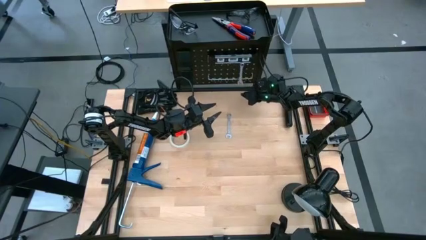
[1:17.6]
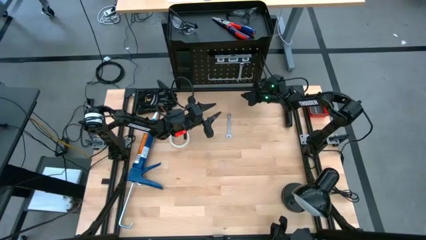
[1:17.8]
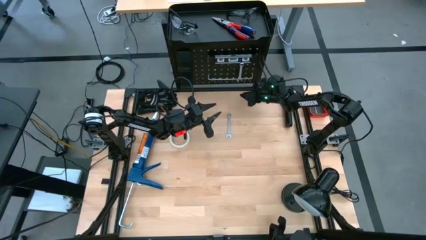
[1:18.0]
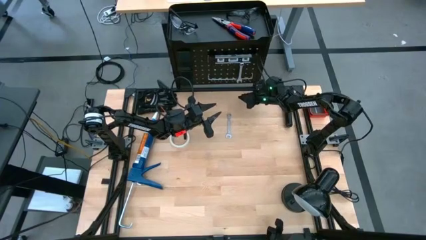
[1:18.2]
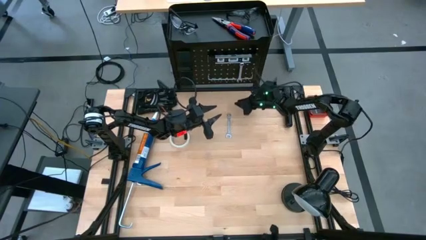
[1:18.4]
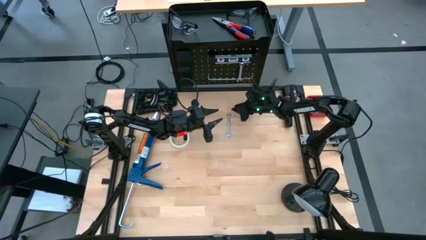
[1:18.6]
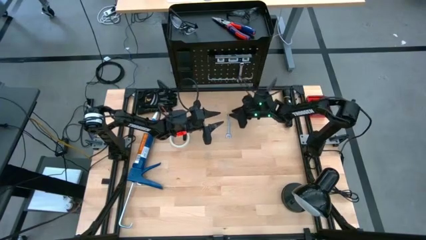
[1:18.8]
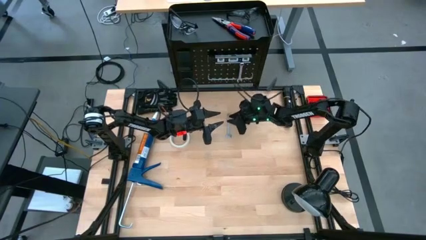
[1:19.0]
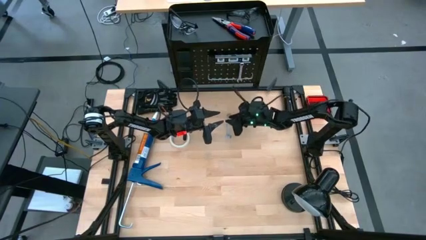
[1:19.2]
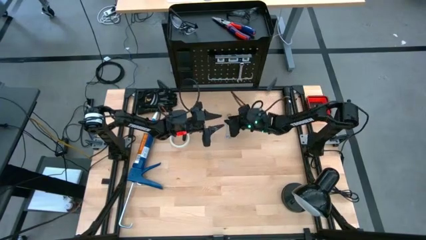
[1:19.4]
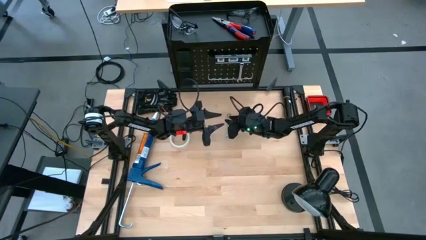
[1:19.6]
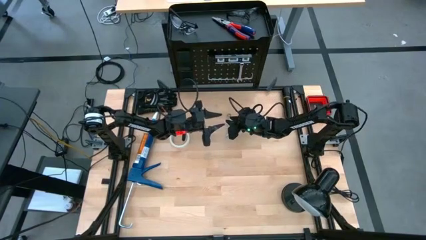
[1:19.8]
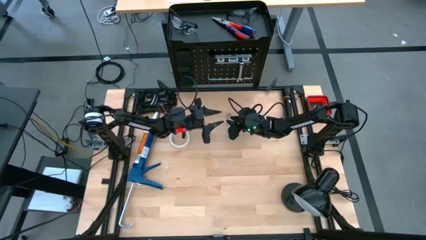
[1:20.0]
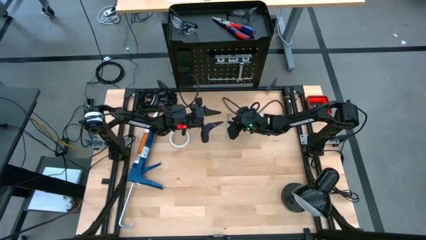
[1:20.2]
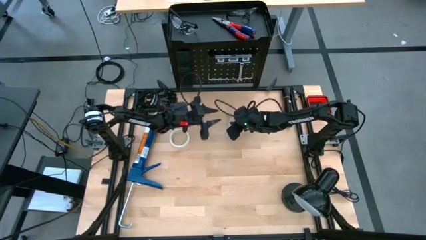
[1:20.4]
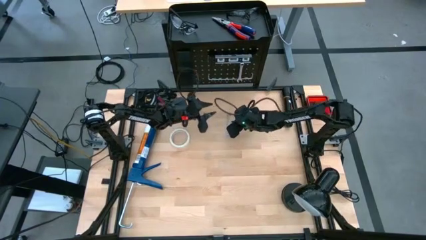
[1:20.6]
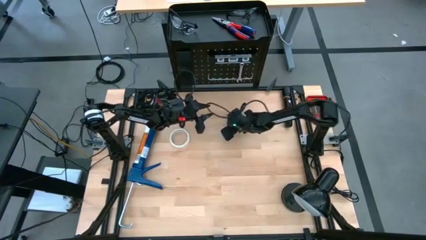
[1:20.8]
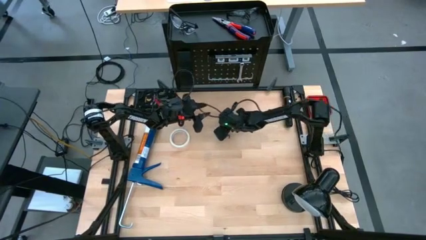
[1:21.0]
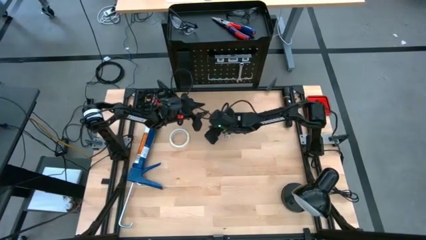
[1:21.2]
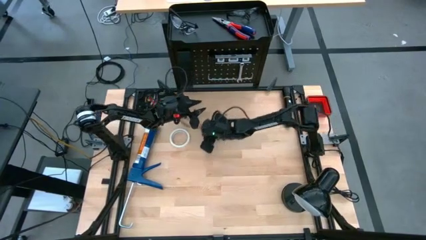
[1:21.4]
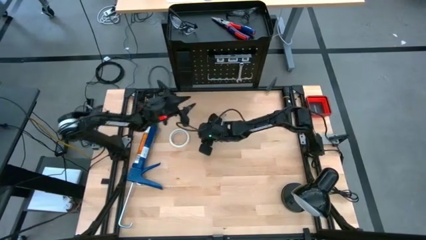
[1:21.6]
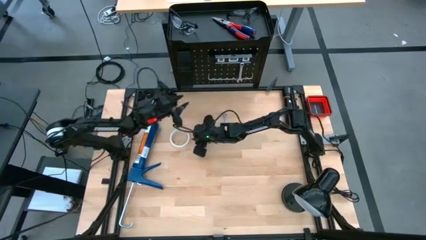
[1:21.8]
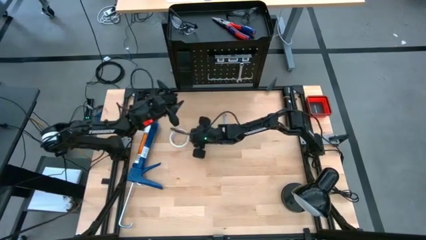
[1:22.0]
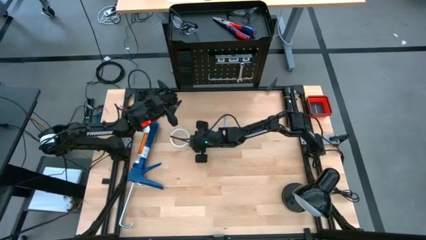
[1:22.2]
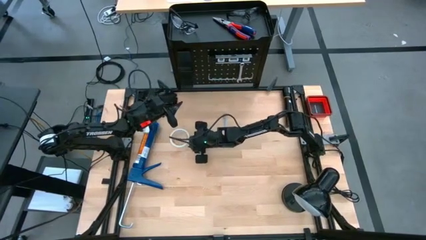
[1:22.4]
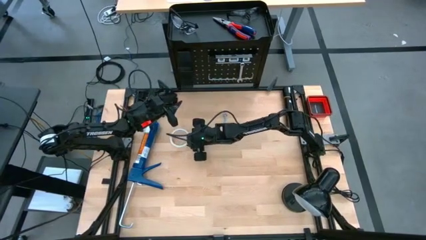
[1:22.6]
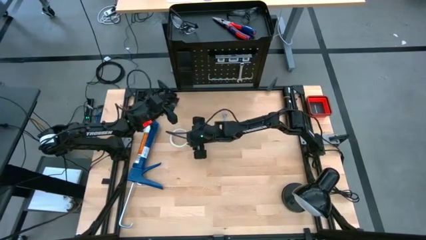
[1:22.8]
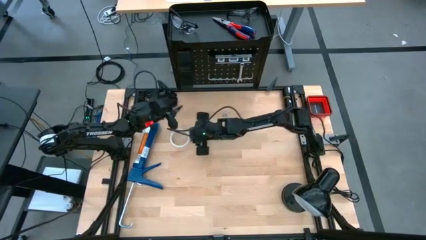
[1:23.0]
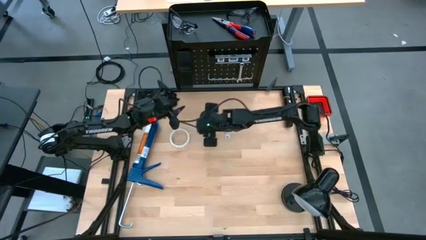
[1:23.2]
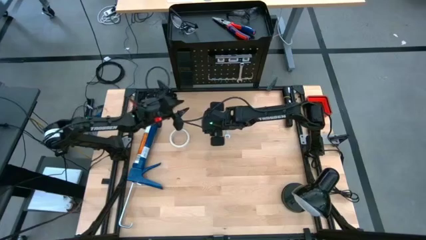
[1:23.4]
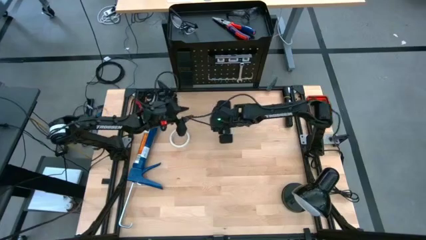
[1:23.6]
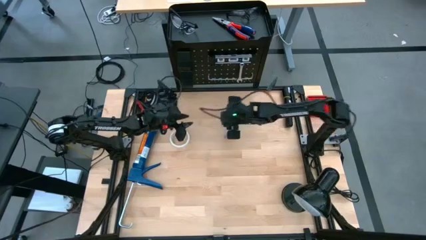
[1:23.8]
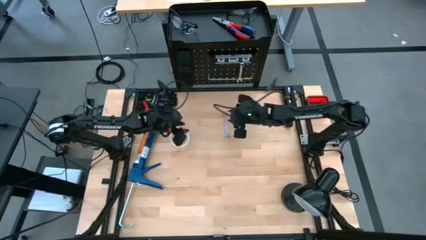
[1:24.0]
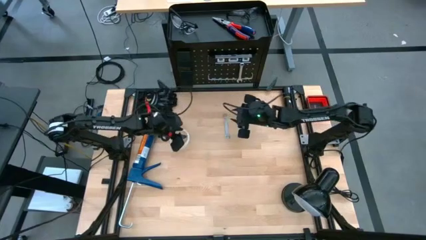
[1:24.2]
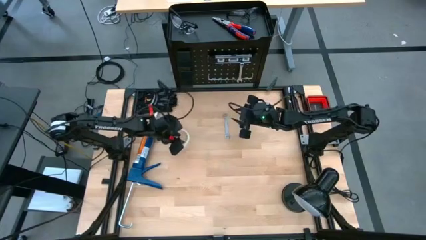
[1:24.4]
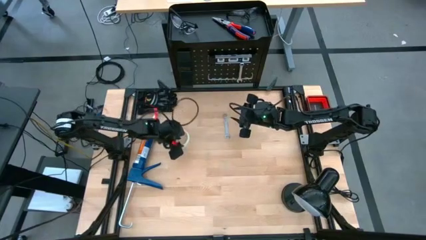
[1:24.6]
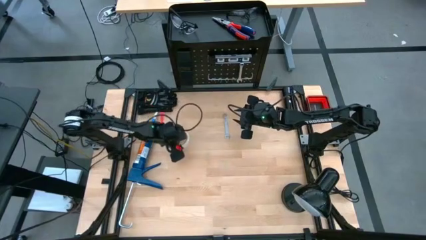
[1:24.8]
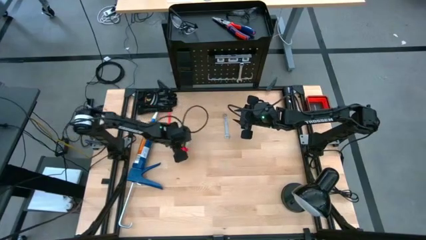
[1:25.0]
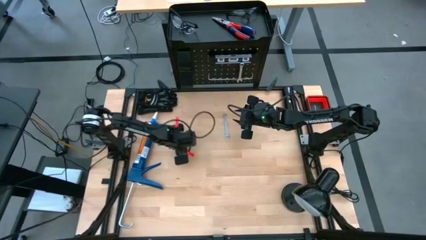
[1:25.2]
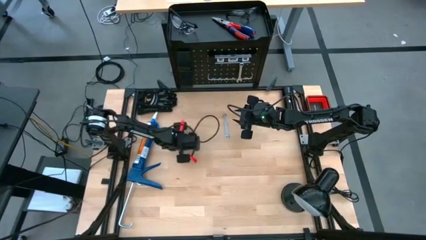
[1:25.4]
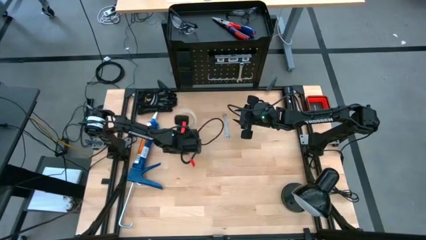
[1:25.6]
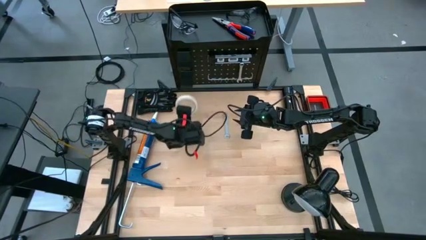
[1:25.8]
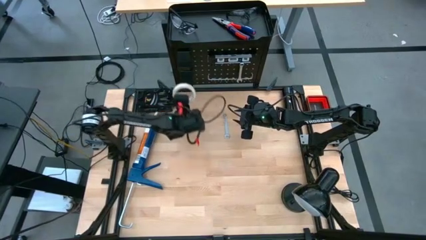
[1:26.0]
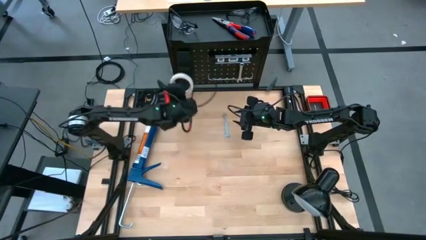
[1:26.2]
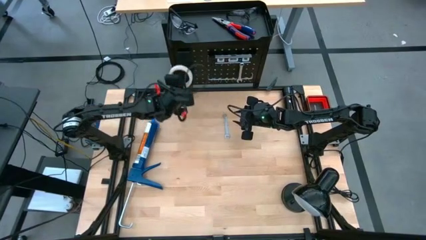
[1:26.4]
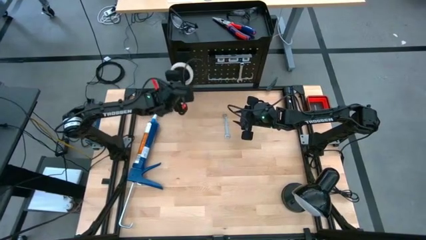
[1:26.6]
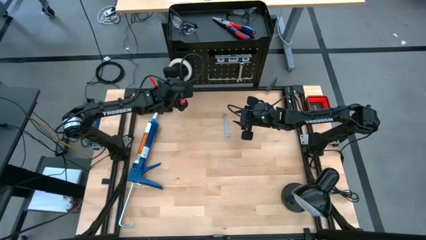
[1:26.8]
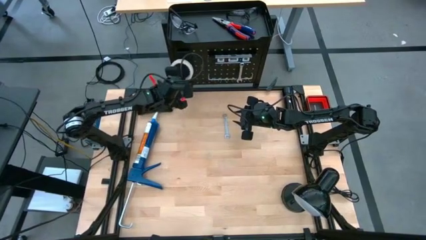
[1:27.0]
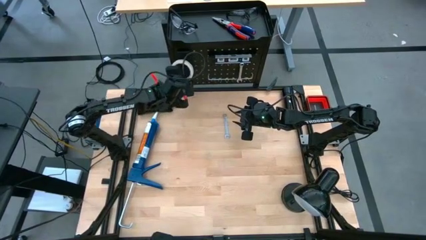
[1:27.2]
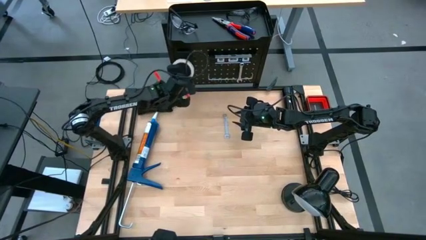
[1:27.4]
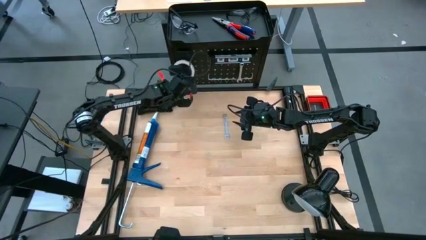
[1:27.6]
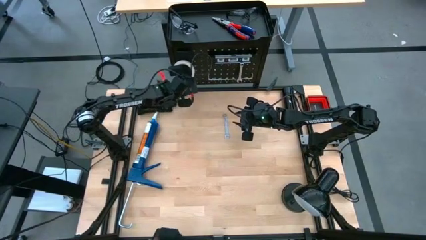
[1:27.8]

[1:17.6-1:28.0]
Task: Hang tools onto peg board
Hang the tape on the peg board

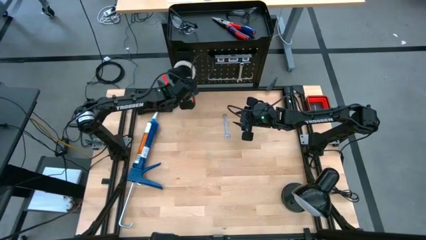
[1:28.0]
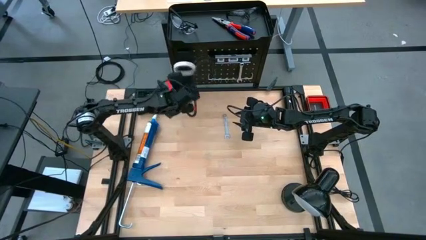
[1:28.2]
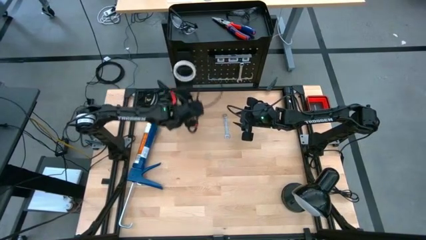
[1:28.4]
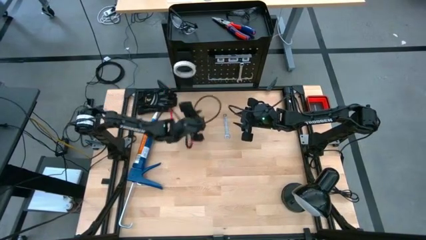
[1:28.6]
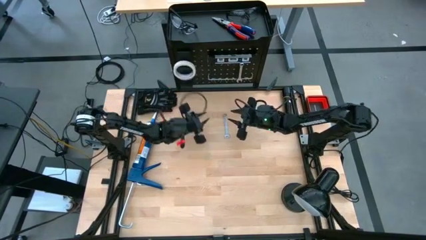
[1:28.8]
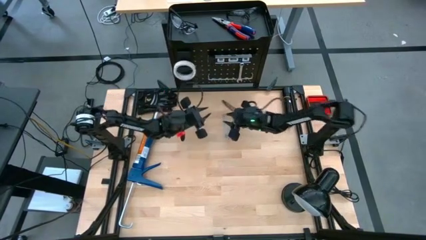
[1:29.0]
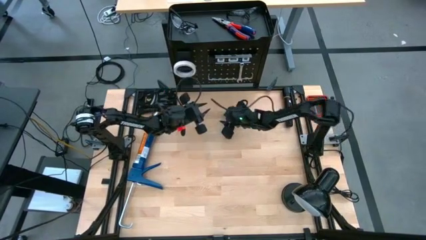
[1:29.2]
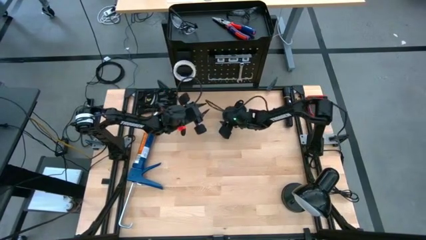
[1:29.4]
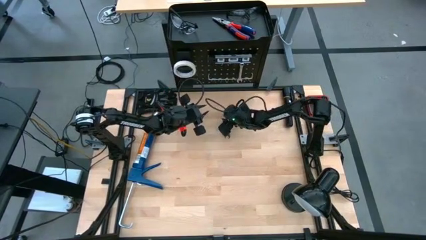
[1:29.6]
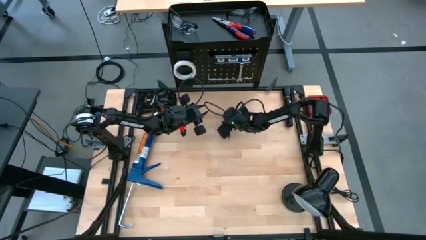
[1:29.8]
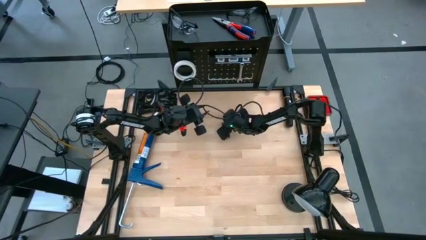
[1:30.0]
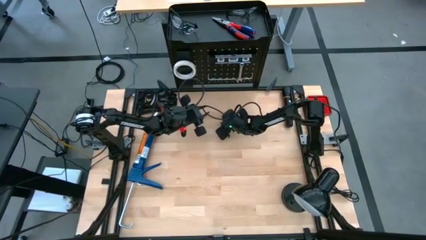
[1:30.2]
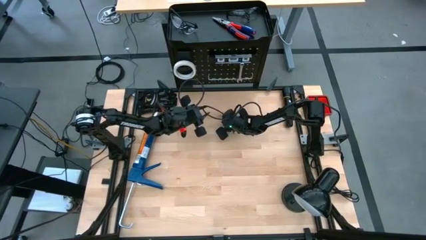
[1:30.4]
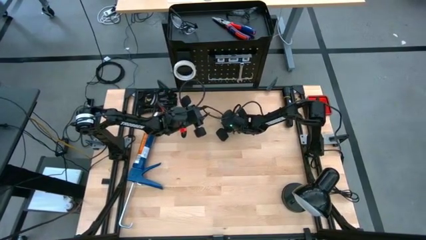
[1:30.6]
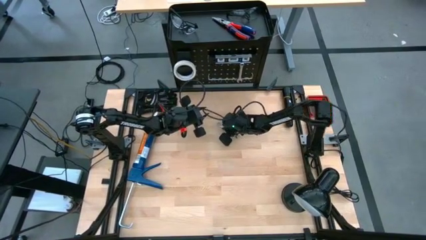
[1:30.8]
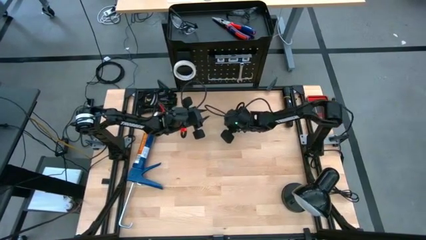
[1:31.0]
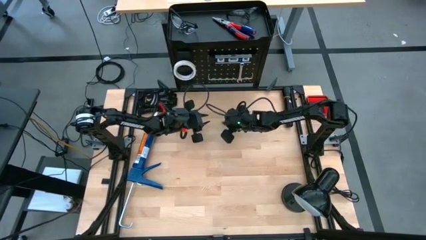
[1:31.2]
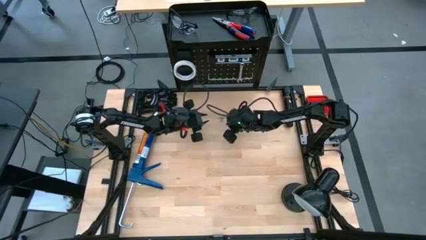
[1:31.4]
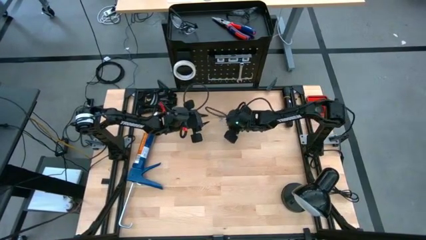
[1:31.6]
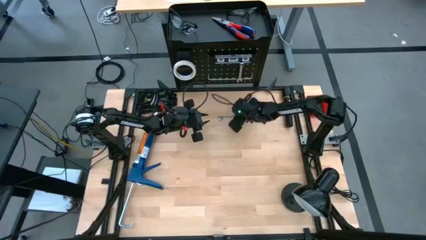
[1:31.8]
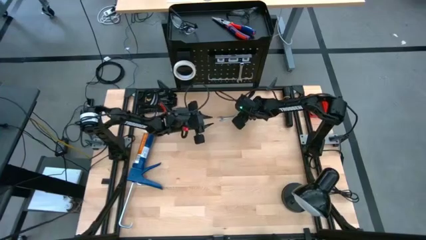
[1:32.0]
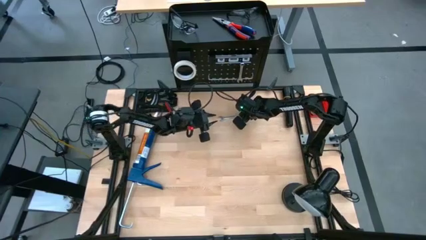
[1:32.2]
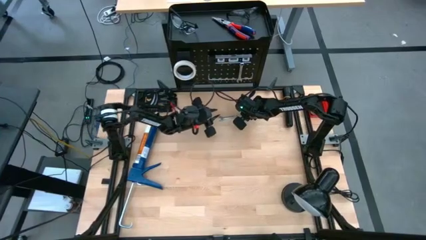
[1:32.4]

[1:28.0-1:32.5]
Hang the wrench on the peg board

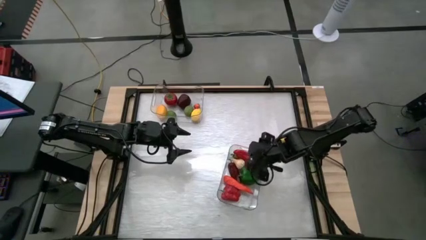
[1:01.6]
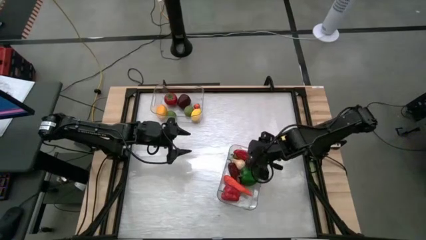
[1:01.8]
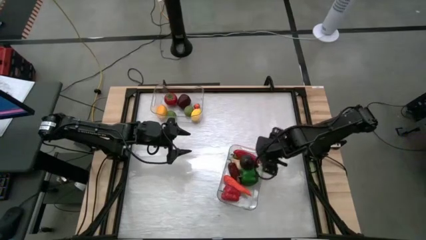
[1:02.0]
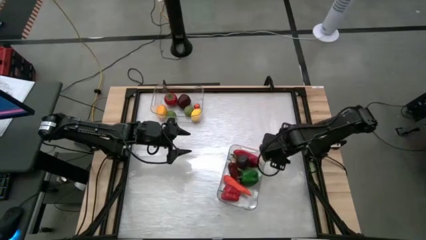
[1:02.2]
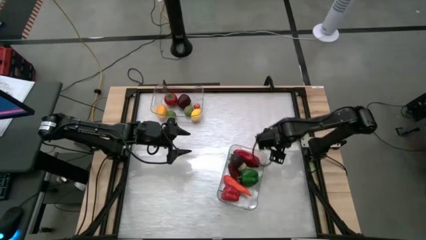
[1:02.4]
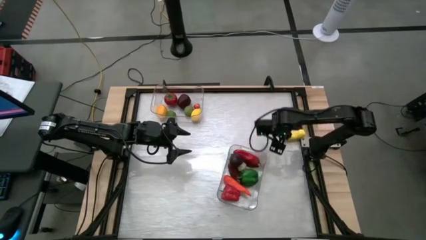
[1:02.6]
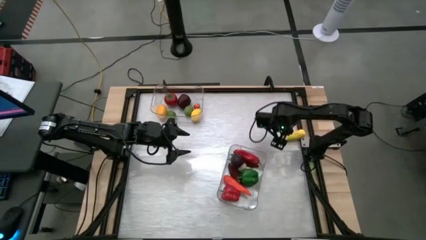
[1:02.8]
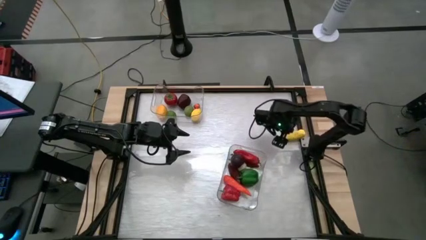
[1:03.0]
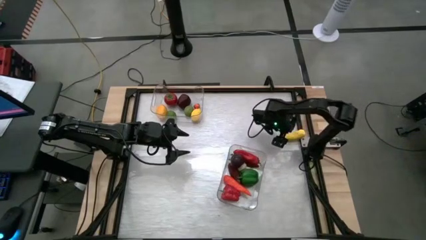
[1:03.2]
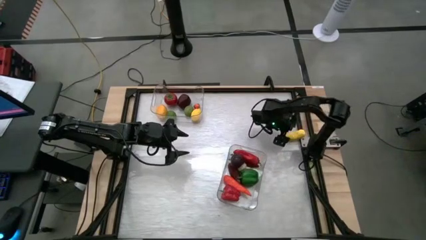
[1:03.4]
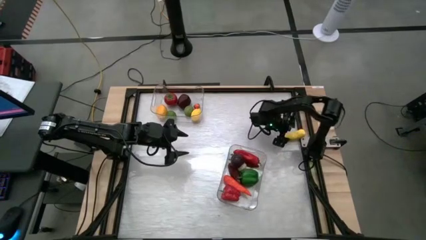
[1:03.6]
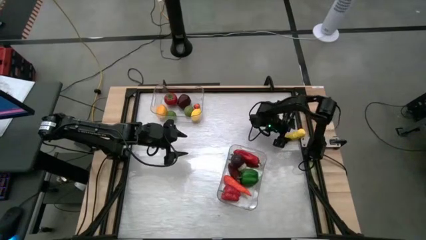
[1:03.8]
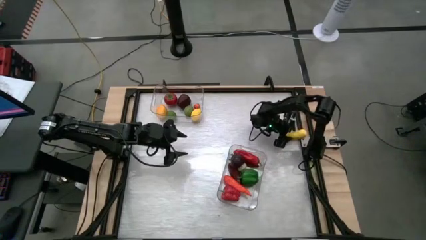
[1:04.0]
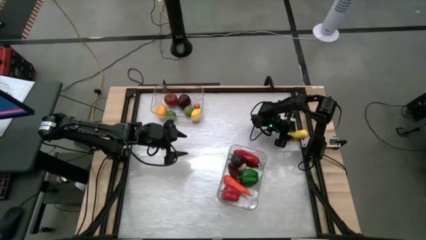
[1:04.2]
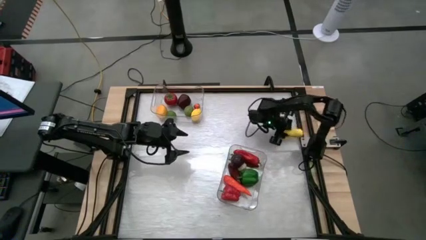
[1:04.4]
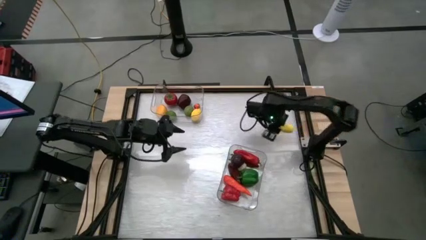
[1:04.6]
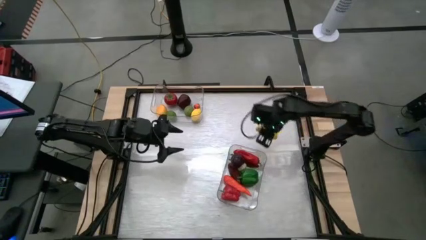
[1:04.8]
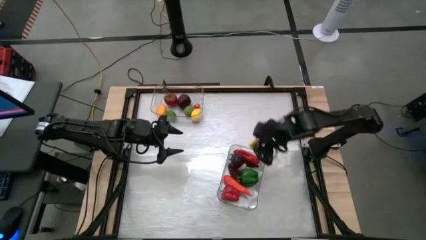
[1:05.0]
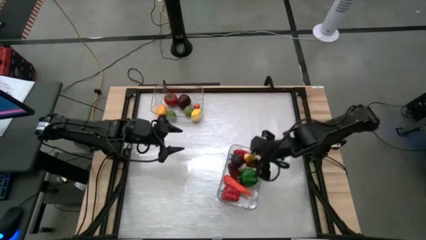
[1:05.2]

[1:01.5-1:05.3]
Task: Sort produce into baskets
Put the corn into the bottom transparent bin
